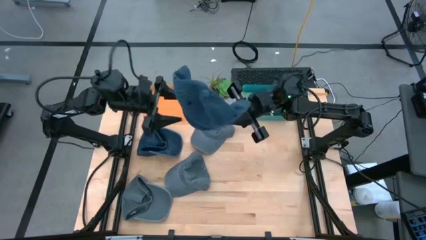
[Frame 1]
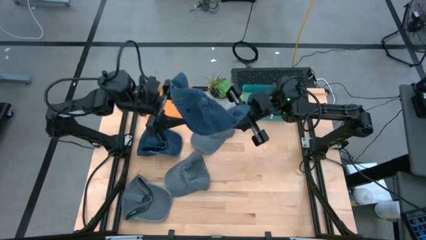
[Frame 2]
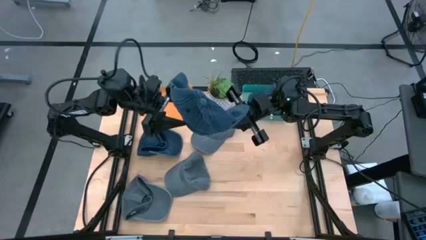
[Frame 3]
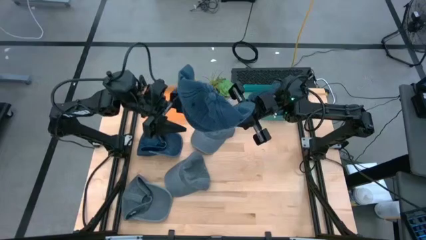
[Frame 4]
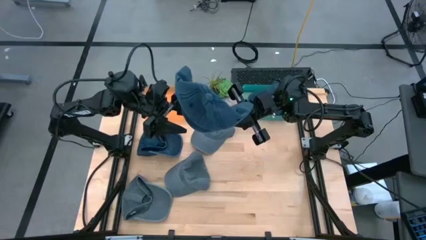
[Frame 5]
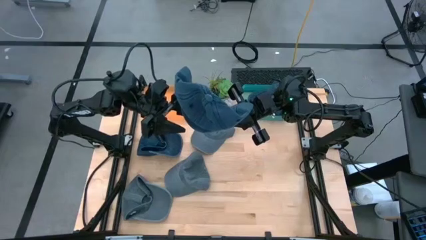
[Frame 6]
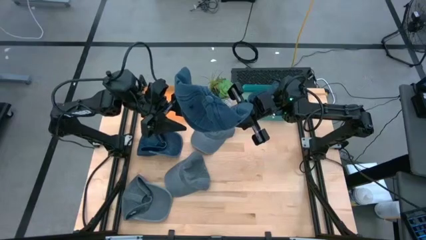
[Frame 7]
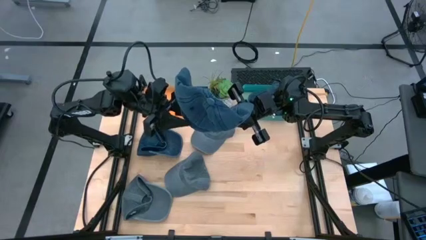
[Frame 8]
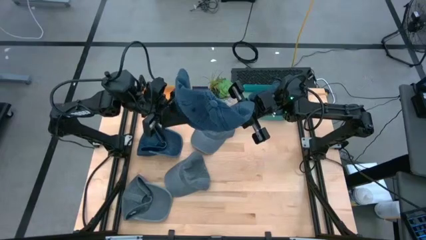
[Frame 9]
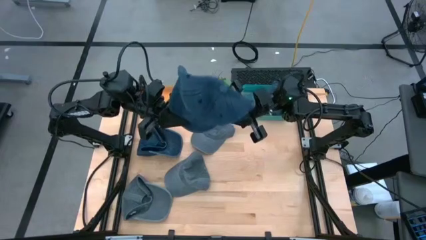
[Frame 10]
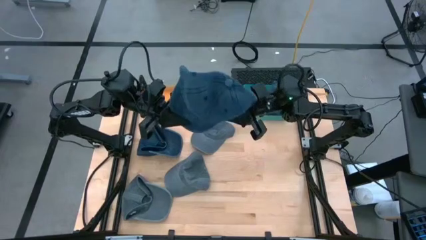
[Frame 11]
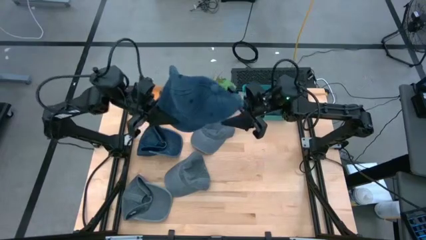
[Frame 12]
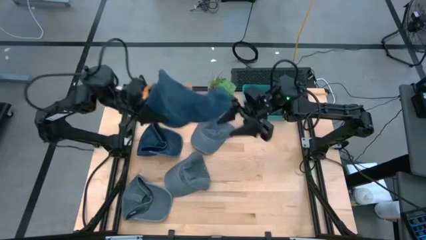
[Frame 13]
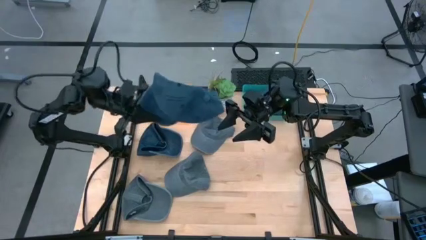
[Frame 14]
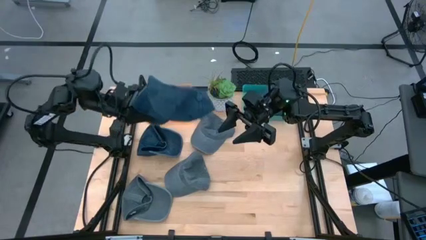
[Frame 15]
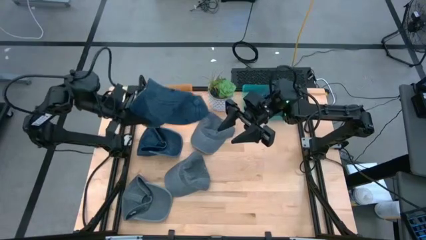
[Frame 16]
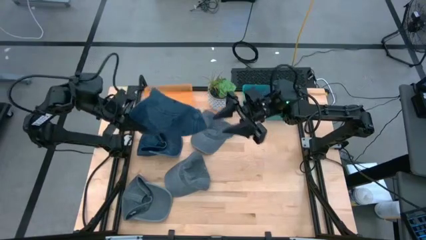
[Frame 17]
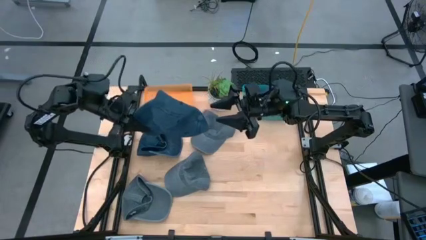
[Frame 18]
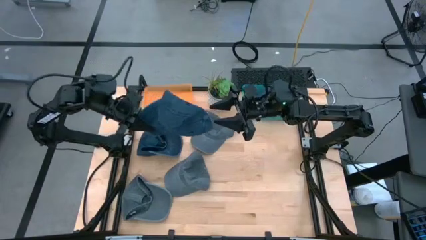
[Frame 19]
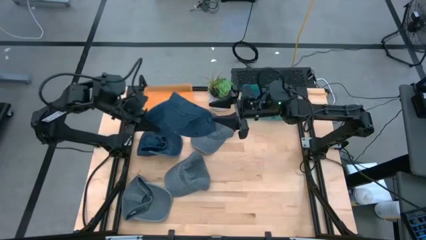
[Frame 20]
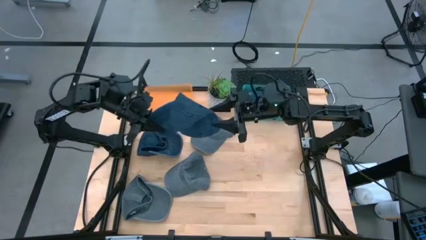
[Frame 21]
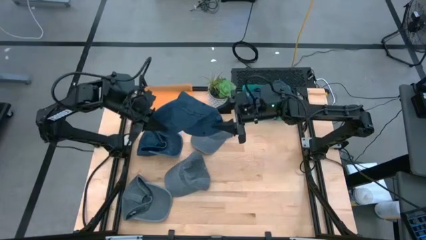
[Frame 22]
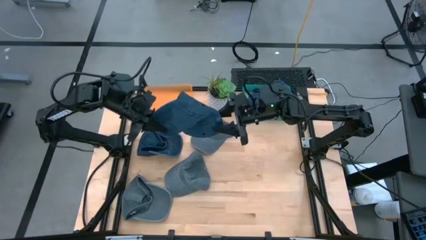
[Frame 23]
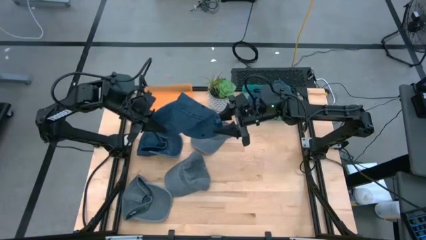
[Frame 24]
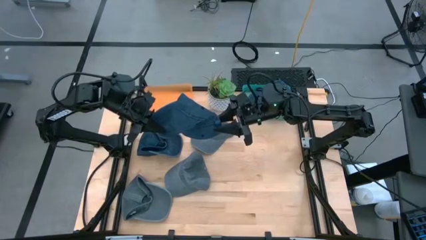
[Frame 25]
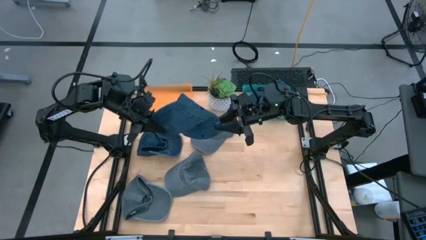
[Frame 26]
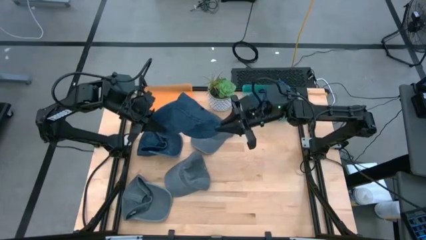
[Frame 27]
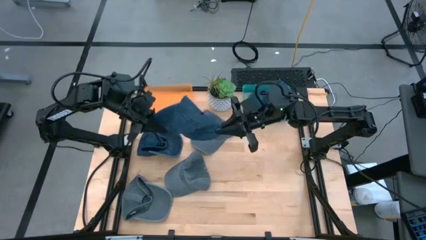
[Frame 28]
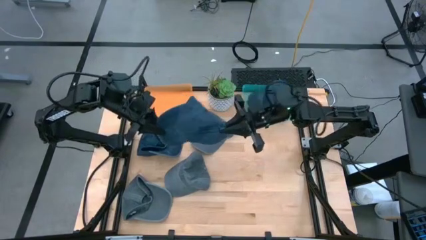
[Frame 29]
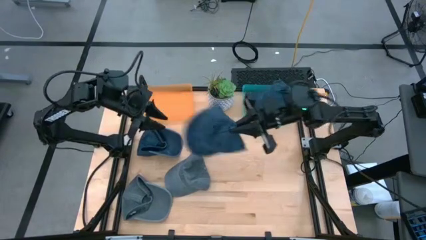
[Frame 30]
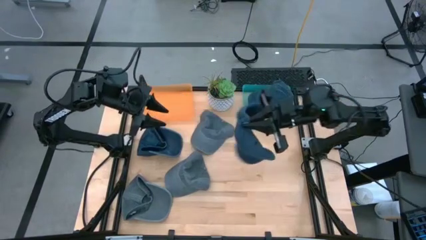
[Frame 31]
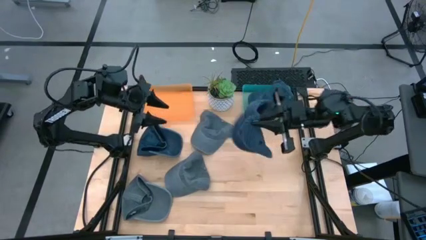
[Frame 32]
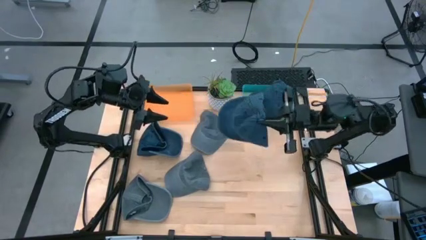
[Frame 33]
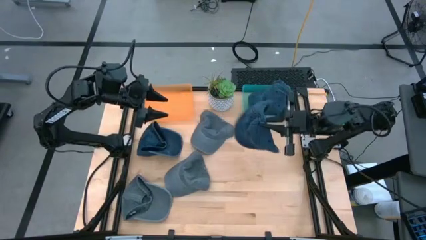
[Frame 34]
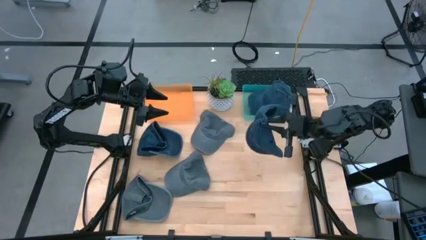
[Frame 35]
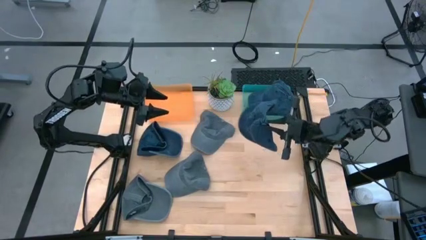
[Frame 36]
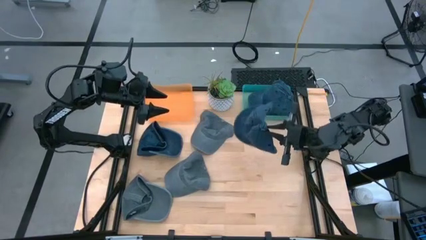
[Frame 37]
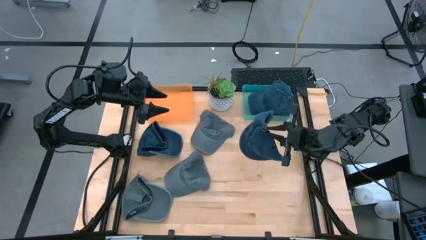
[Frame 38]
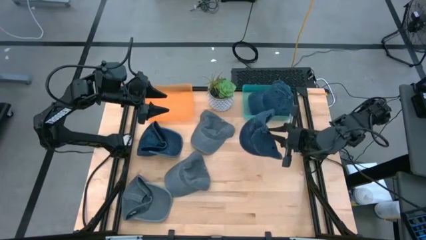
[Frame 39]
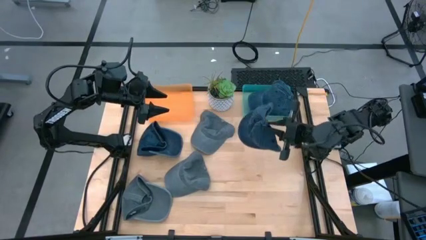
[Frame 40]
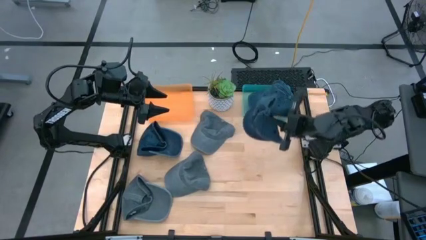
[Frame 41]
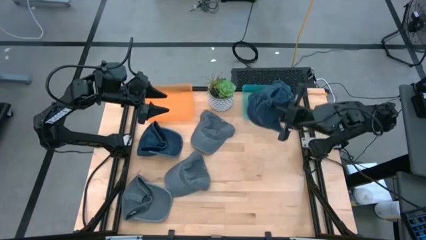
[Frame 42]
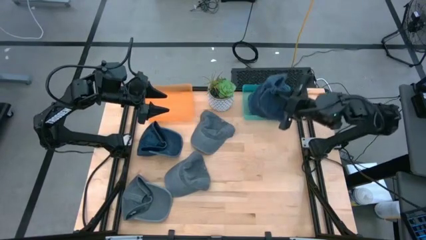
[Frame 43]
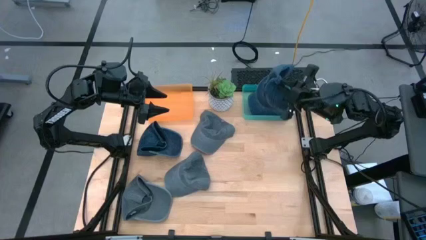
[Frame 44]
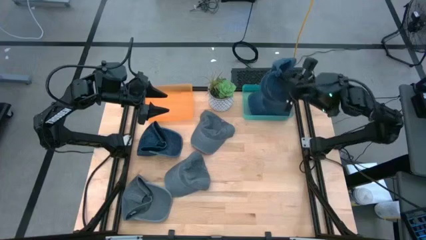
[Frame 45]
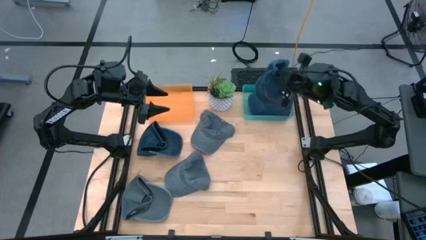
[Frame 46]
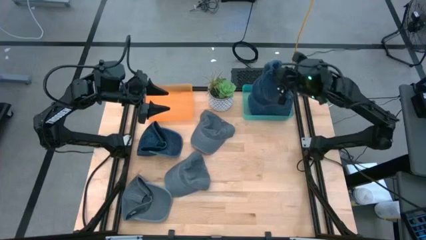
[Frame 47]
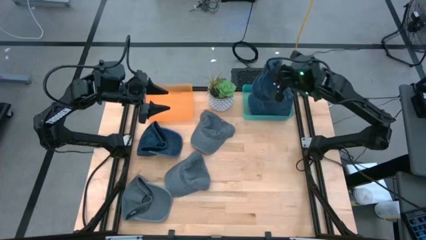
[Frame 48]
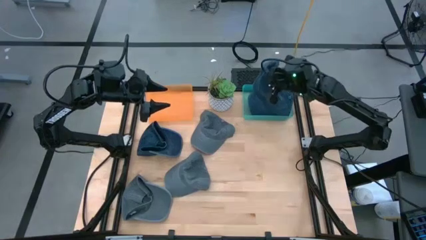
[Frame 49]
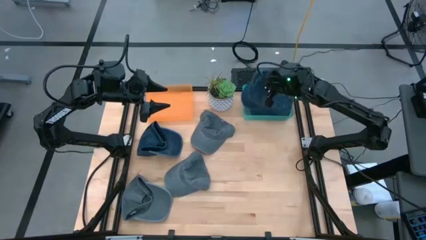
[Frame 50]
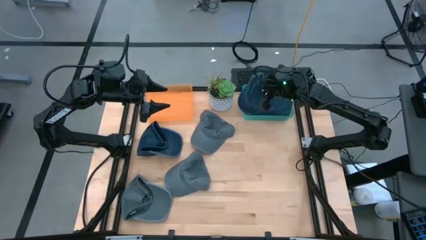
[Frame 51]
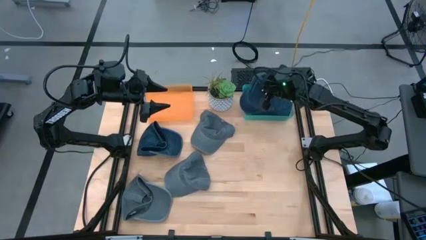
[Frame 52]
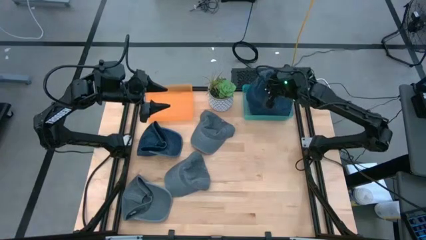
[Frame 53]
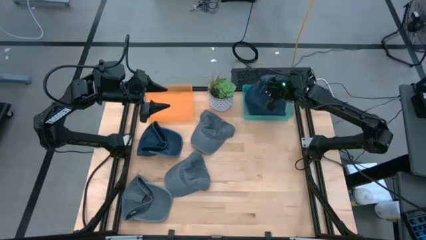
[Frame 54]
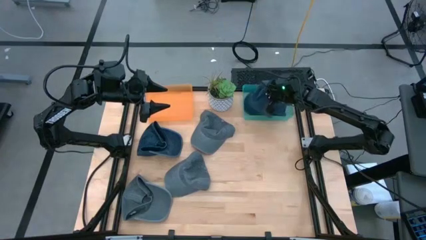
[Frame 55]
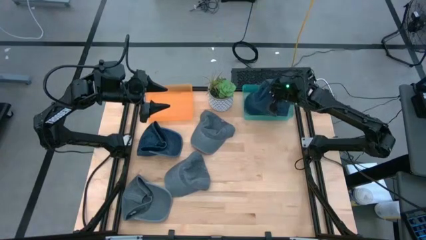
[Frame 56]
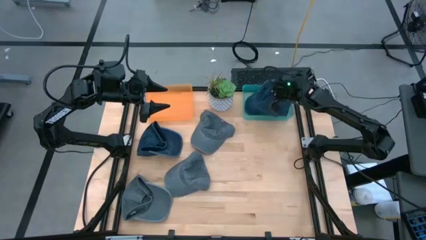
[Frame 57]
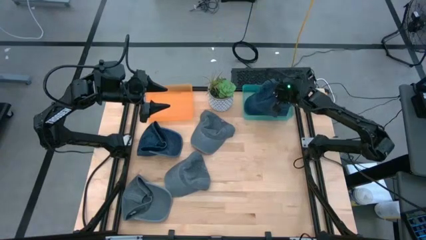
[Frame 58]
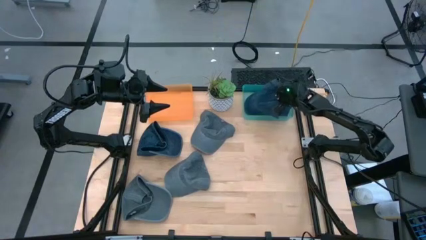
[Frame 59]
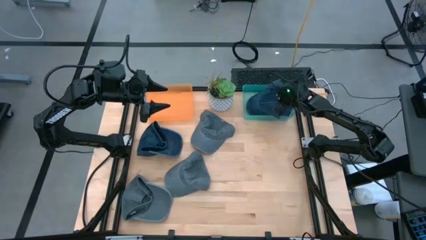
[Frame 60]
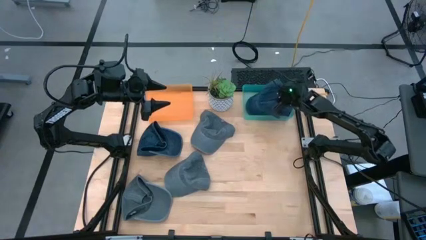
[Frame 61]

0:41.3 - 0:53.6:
Task: Pick & Place hat
Put the right blue cap into the light blue bin
